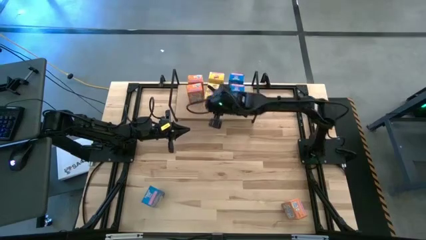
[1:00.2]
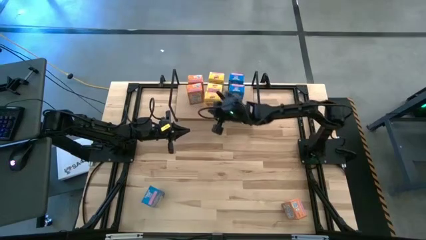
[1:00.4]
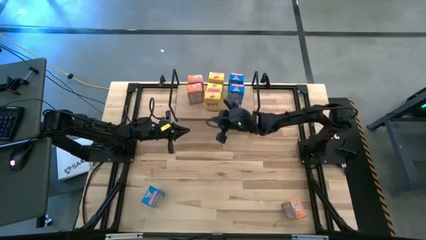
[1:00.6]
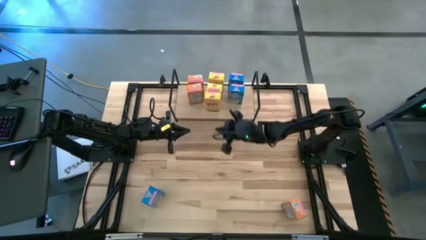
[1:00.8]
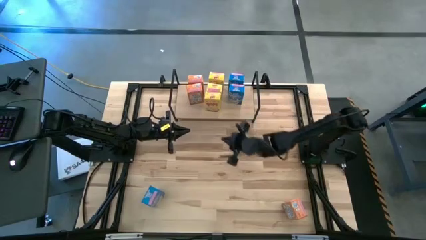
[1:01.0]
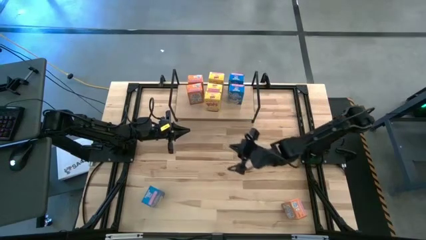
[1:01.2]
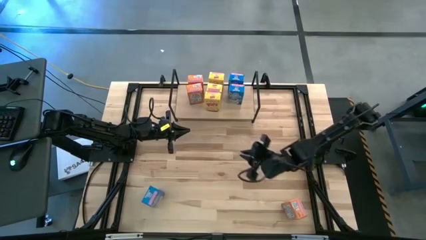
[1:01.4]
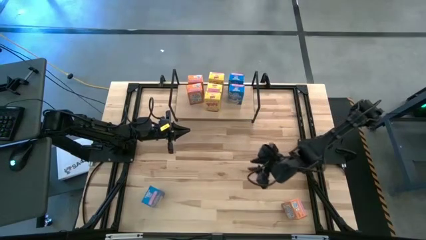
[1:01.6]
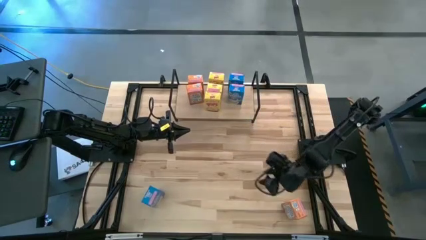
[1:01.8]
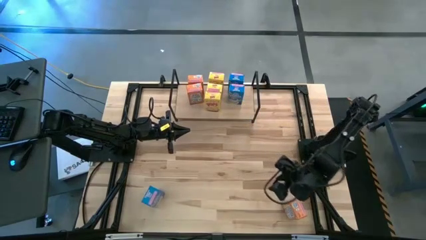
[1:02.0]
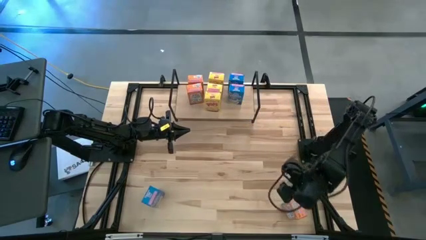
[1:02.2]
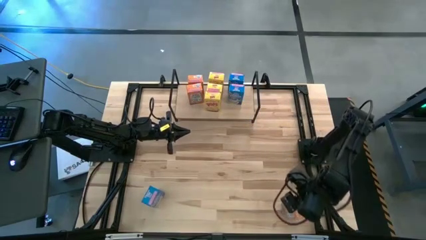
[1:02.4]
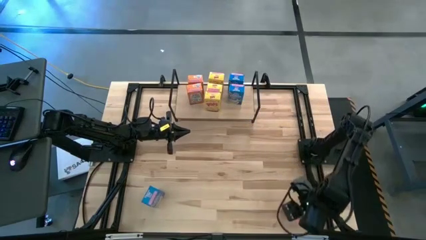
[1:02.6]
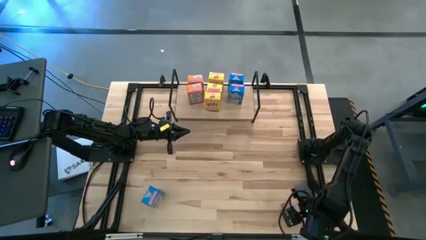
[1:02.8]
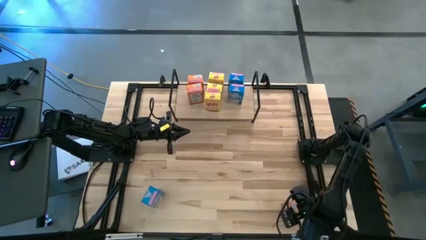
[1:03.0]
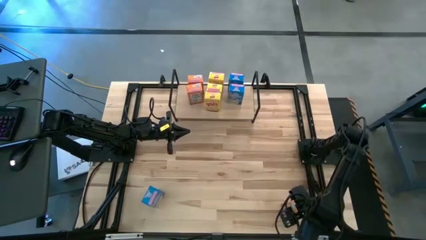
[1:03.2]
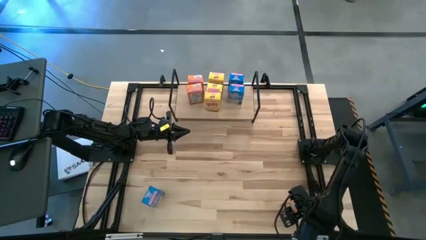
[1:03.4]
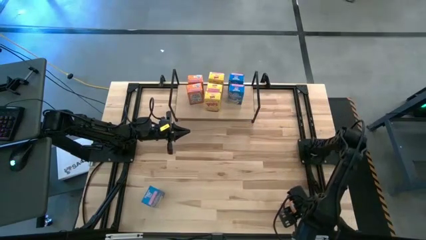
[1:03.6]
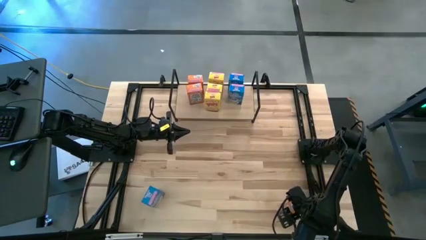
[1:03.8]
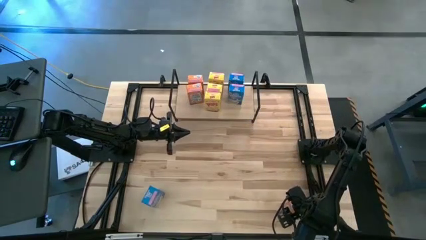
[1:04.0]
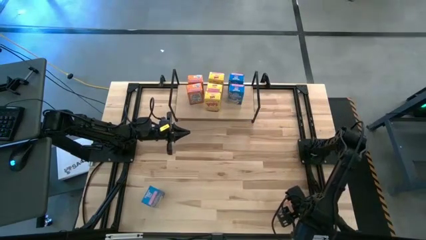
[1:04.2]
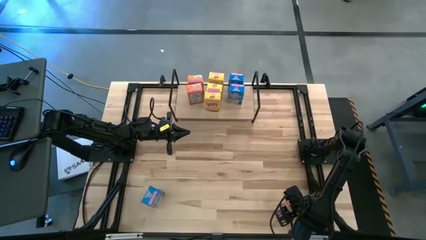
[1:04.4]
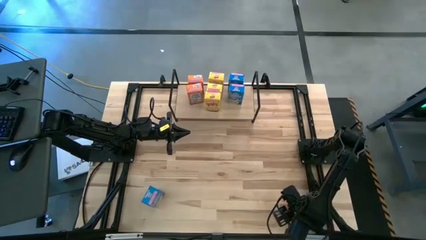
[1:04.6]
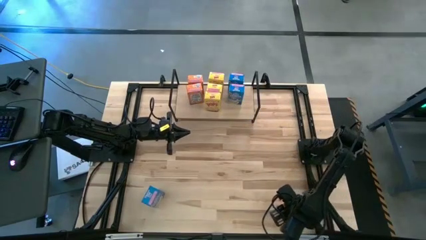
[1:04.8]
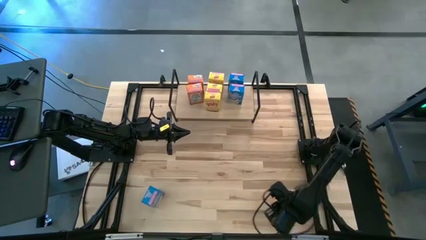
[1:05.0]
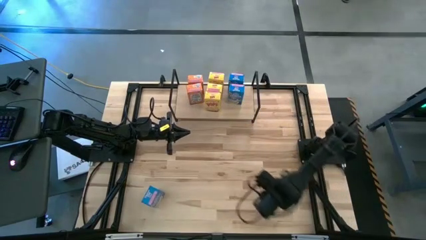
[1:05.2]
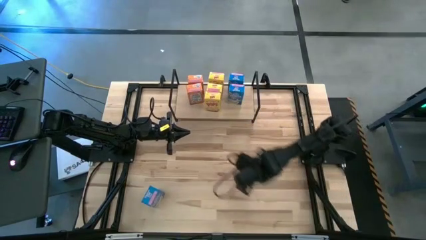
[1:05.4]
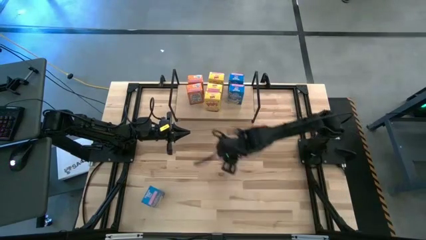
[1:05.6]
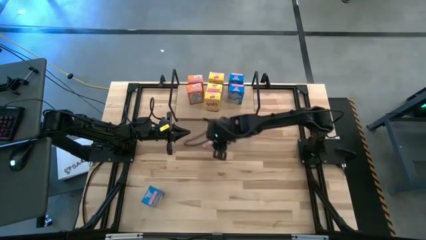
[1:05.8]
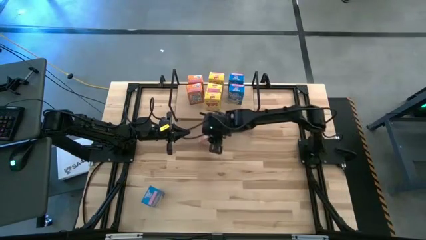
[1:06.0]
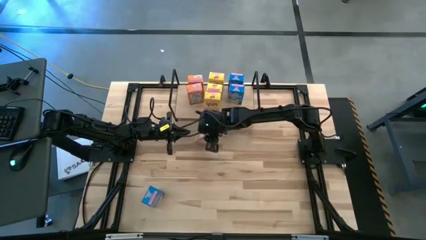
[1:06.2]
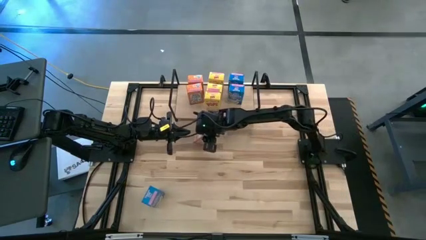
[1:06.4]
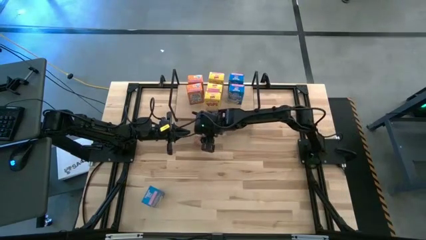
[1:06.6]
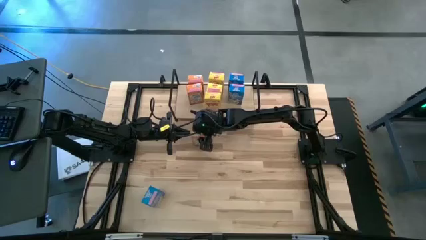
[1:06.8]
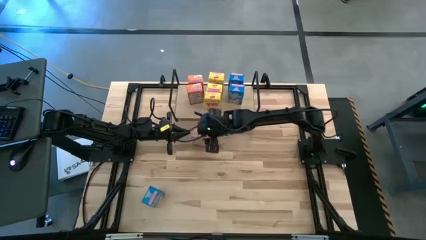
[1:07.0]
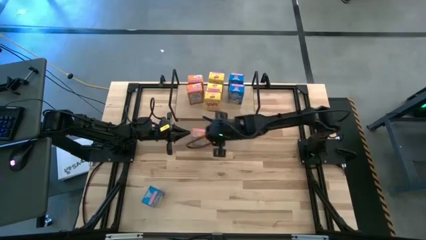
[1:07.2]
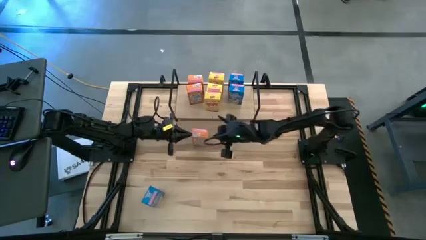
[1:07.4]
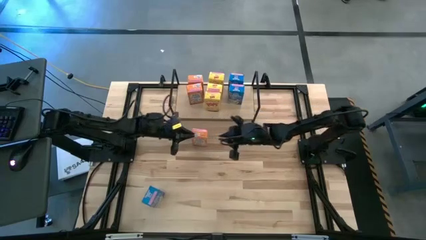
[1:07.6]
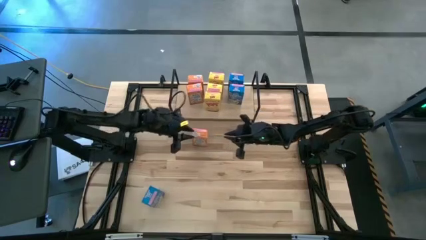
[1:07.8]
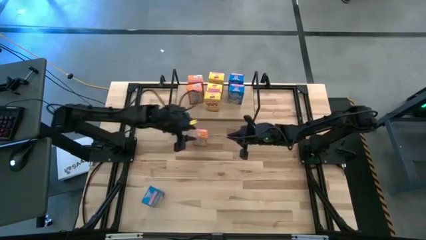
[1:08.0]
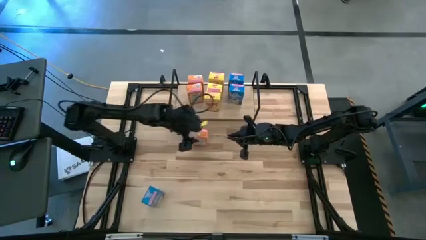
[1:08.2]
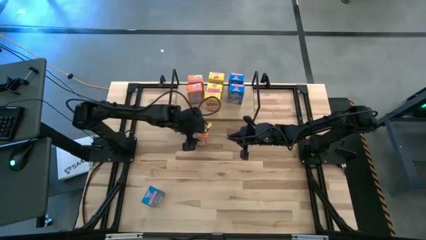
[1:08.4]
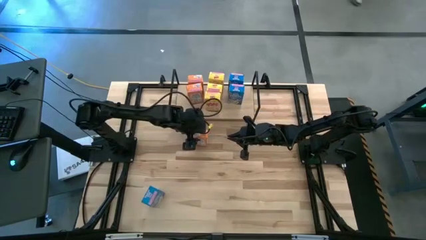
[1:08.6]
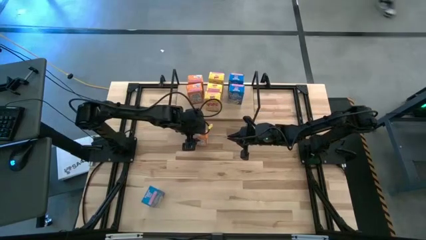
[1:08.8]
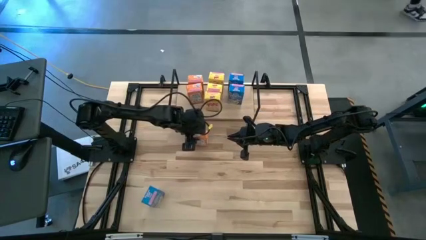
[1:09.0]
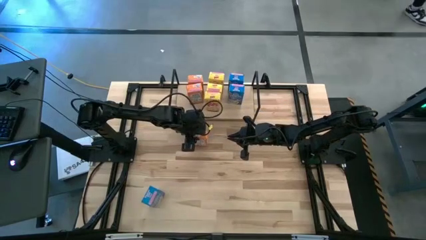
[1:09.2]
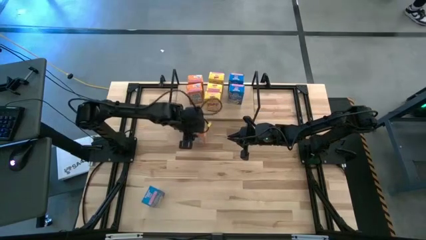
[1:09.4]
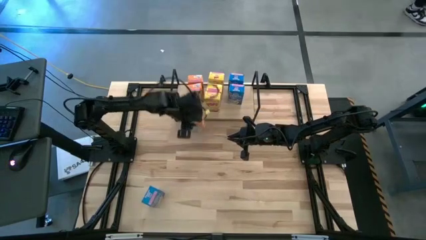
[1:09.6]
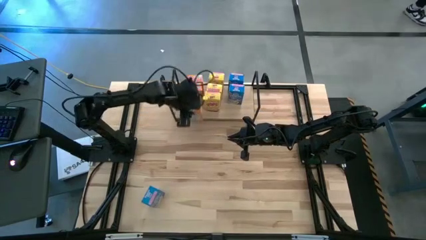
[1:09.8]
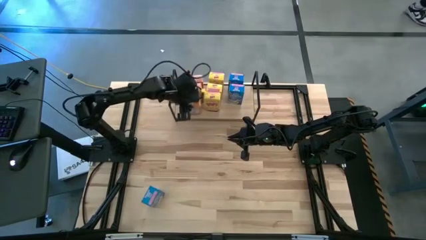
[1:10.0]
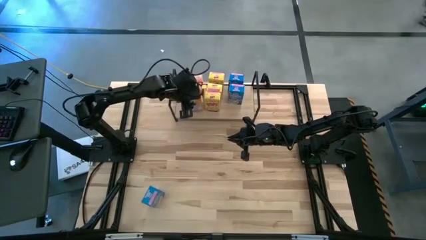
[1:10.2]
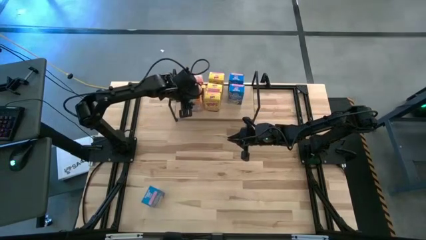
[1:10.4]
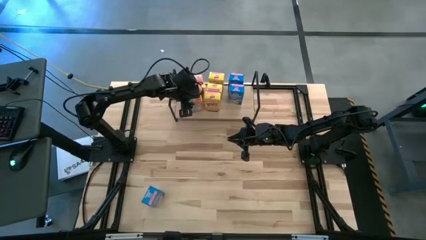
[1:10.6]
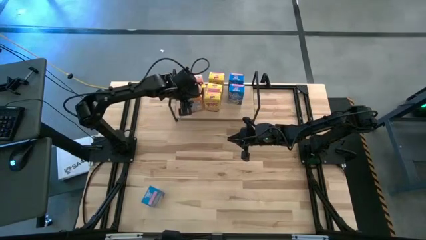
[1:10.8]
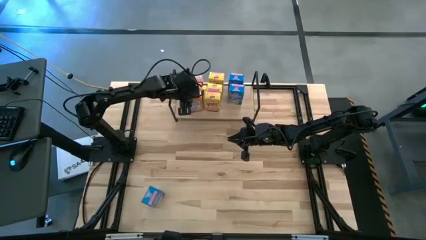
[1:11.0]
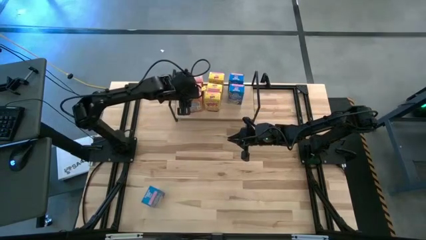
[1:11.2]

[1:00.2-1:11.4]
Task: Stack cereal on shelf
Put the orange cereal box on the shelf aligned with the other orange cereal boxes

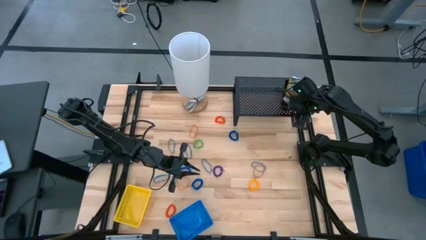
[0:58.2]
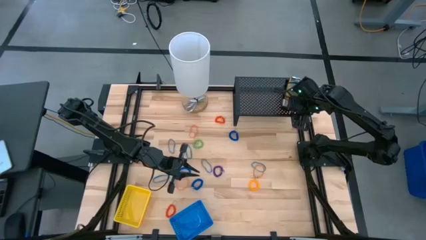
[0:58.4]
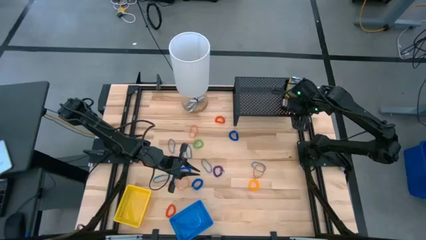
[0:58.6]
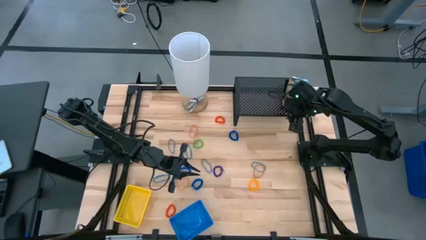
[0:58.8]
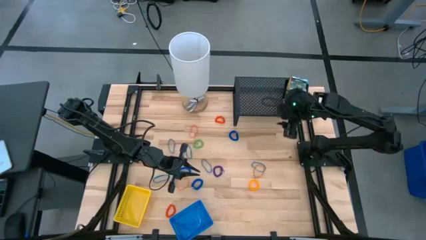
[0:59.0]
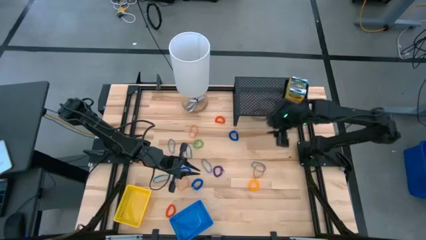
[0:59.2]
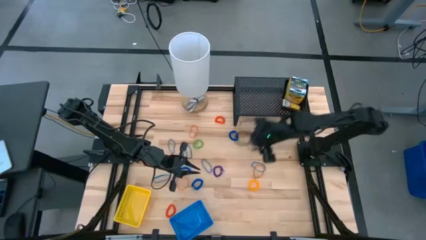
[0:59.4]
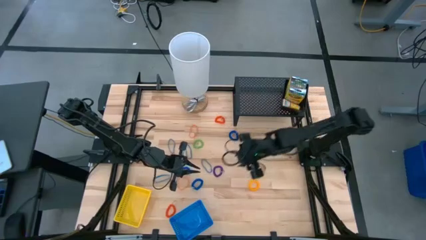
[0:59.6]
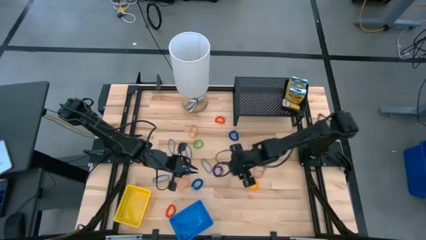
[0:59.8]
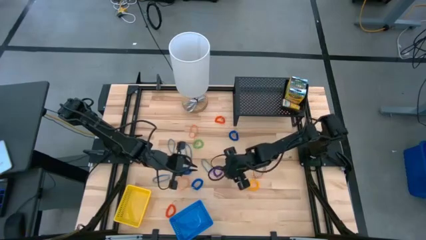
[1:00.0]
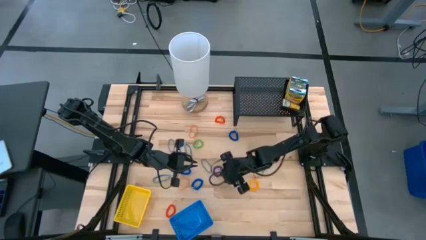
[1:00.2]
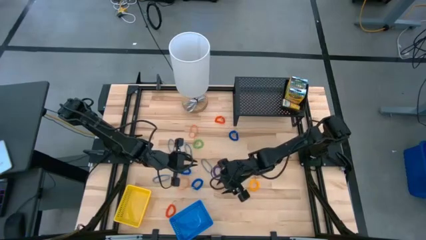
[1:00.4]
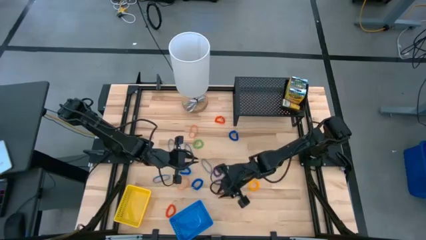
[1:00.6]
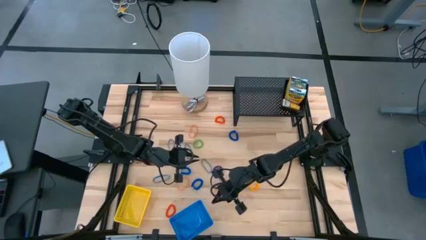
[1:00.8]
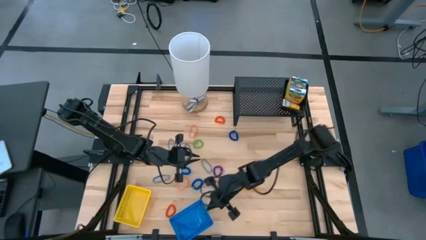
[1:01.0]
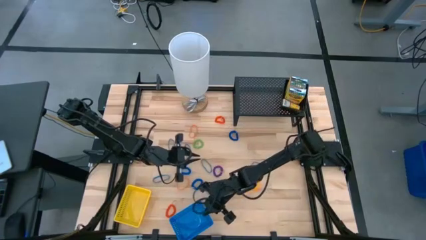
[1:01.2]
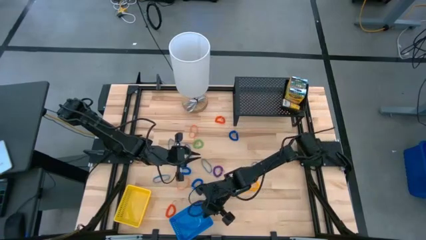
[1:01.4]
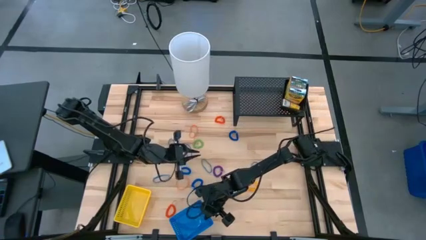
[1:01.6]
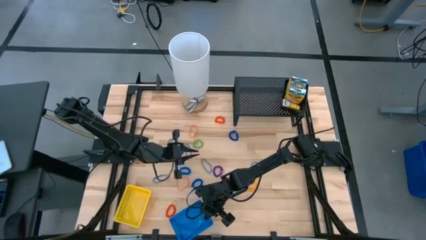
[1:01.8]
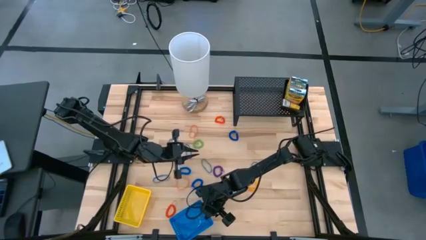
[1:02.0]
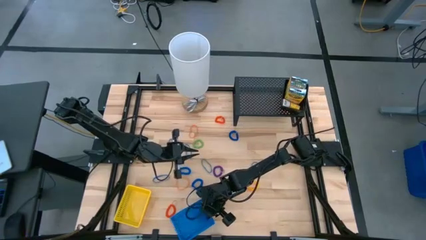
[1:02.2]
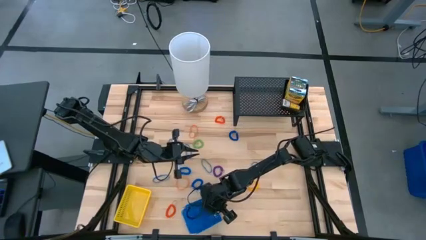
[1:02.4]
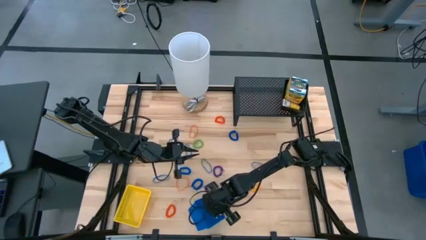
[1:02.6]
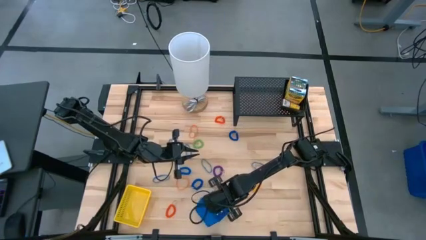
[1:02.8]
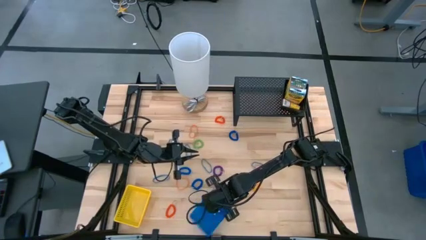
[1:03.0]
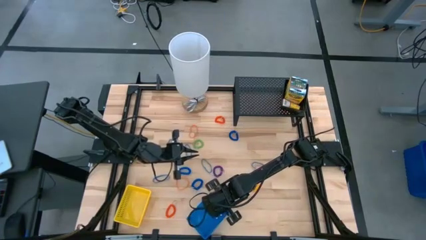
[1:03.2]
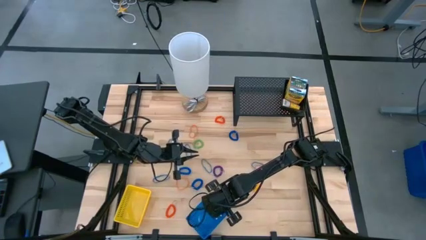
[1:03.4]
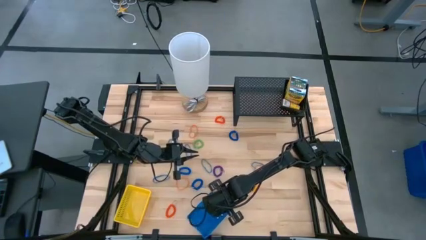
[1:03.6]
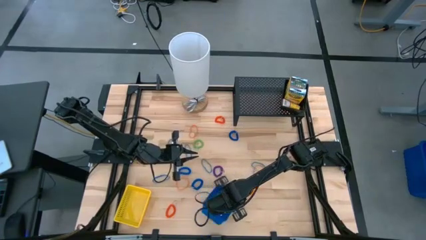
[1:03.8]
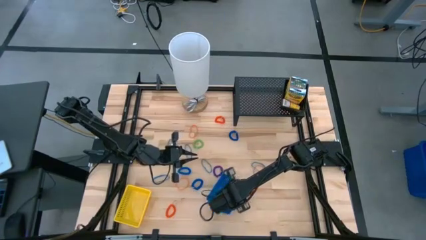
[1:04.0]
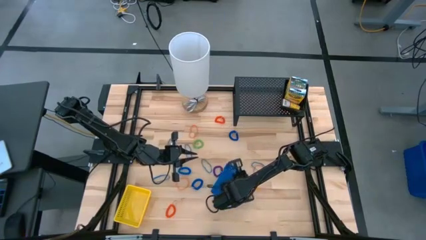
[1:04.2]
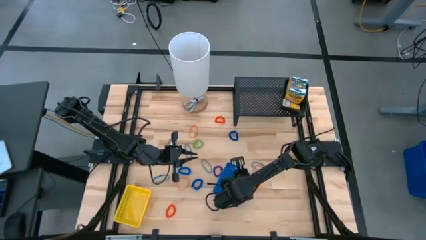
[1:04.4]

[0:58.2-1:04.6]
Task: Pick & Place Office Desk Supplies
Adjust the blue bin
